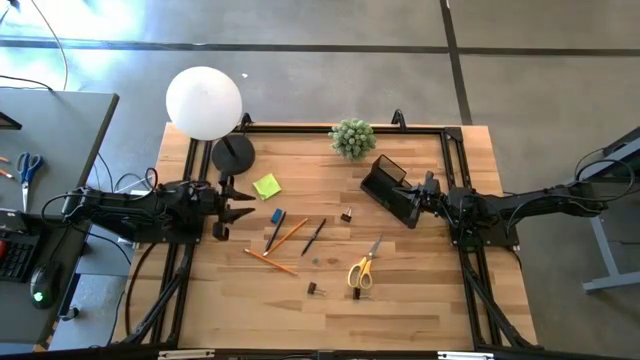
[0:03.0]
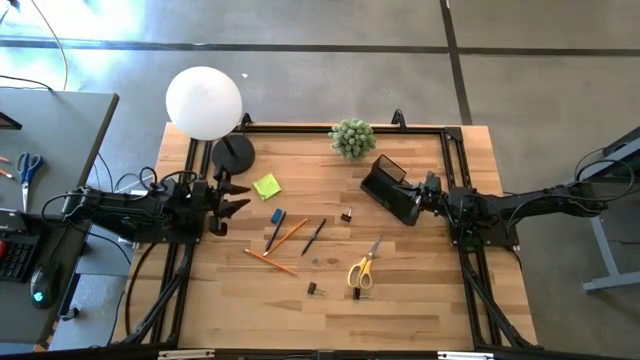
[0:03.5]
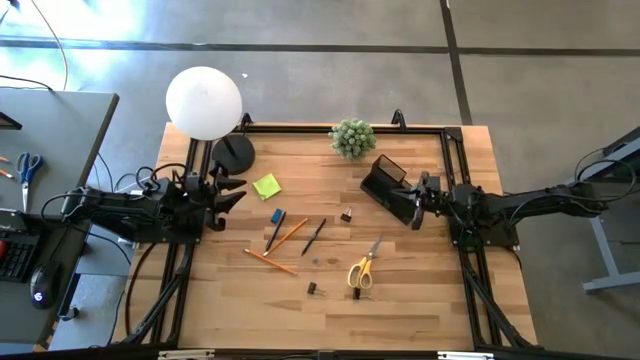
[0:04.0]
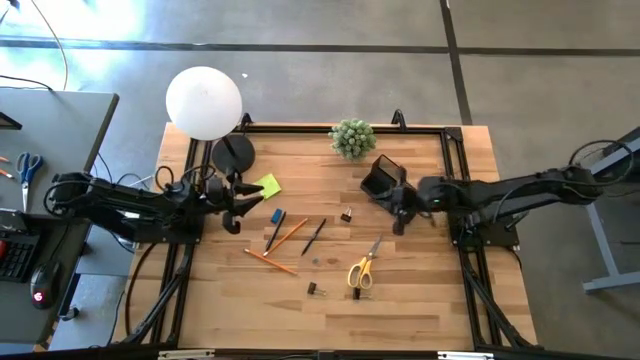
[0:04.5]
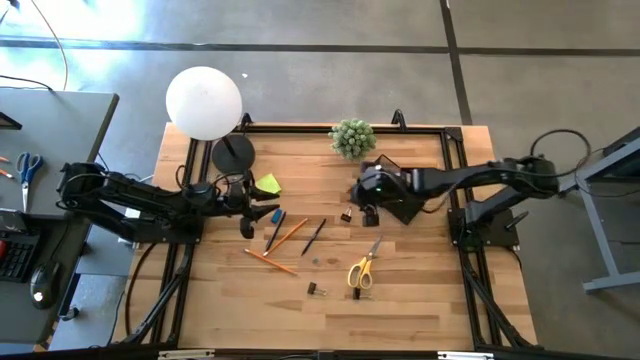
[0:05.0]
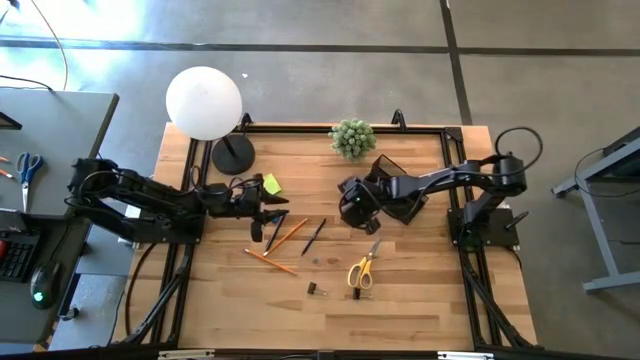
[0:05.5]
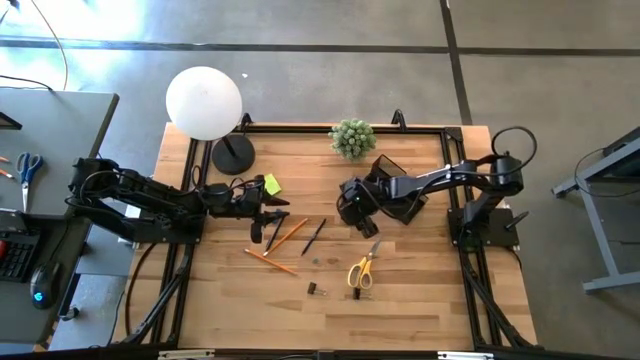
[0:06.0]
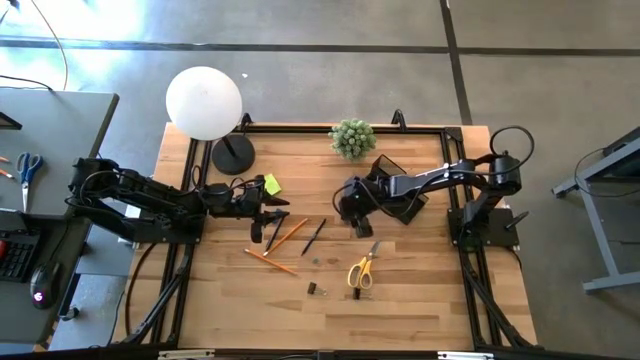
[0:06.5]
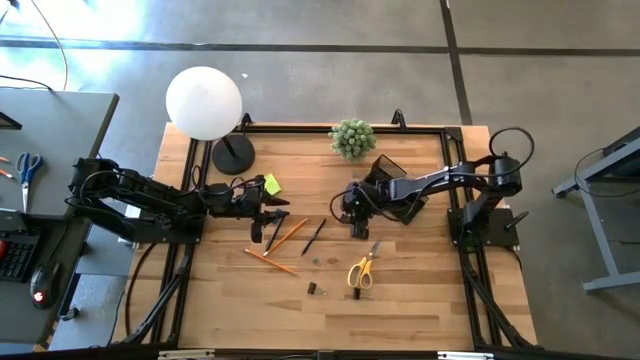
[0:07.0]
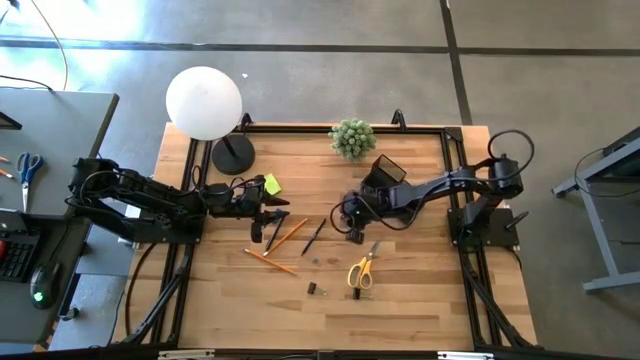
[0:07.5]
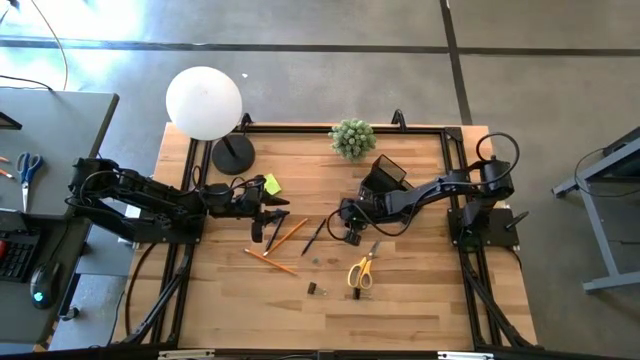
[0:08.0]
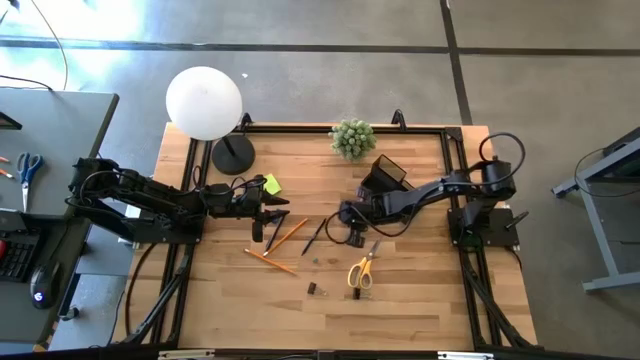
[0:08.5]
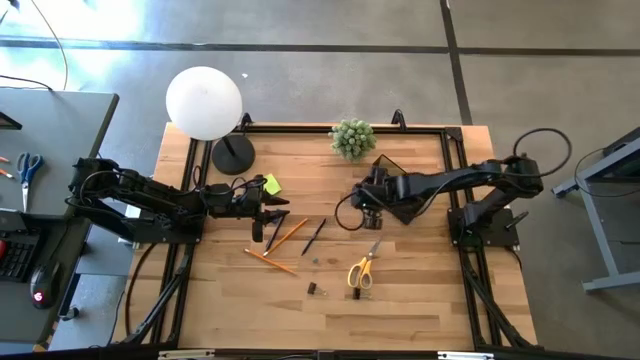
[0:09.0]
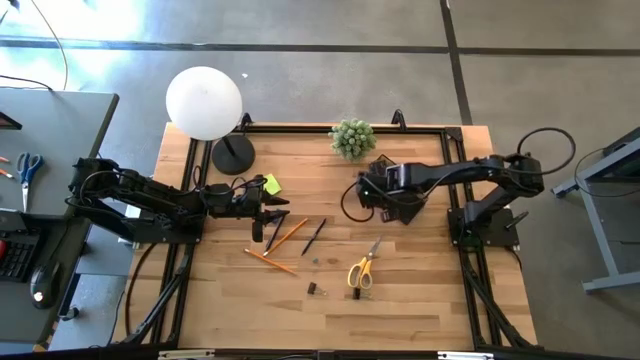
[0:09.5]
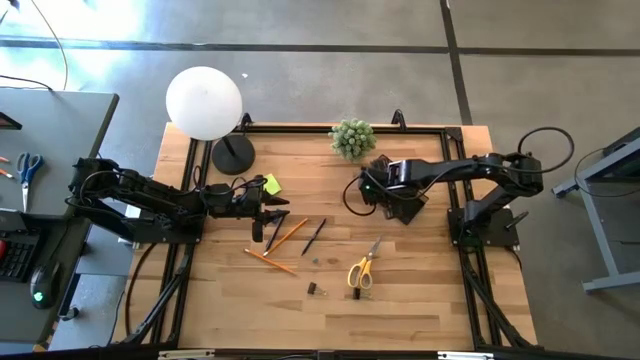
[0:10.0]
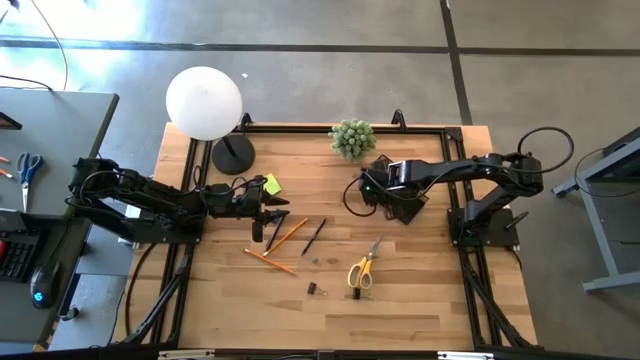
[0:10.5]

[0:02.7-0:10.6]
Task: Pick and place office supplies into organizer
Put the top black binder clip into the desk organizer

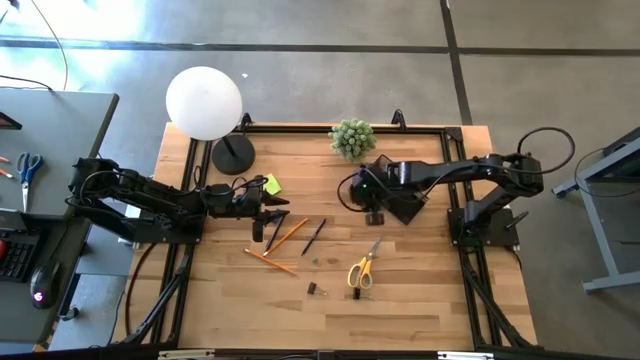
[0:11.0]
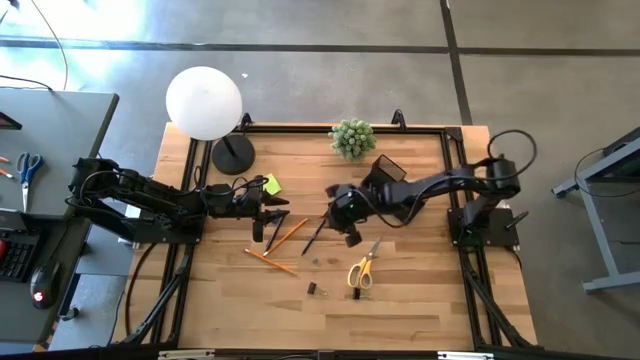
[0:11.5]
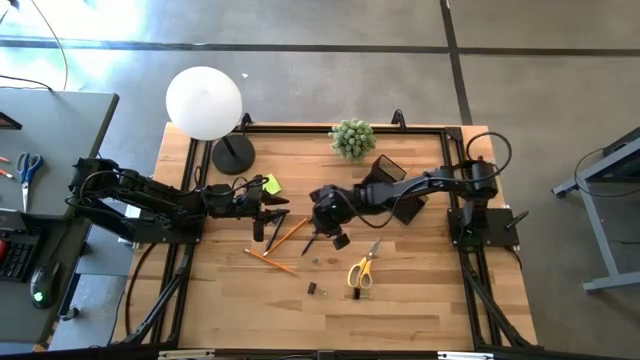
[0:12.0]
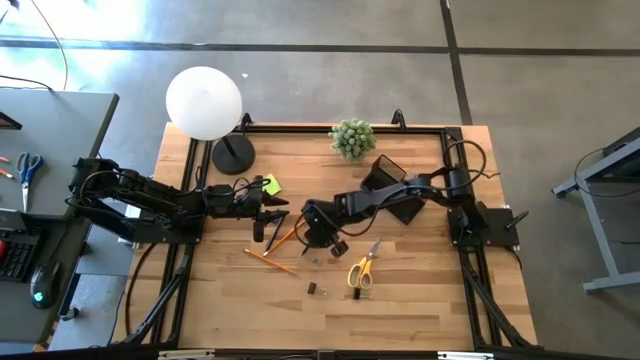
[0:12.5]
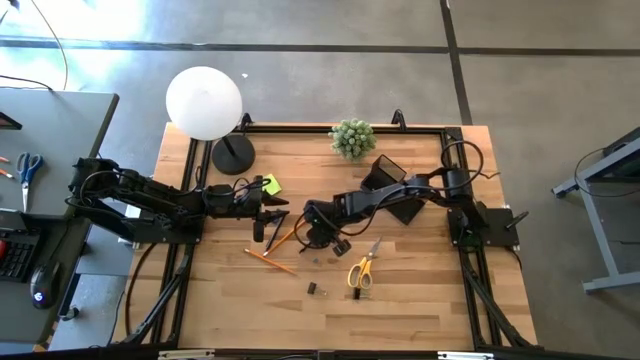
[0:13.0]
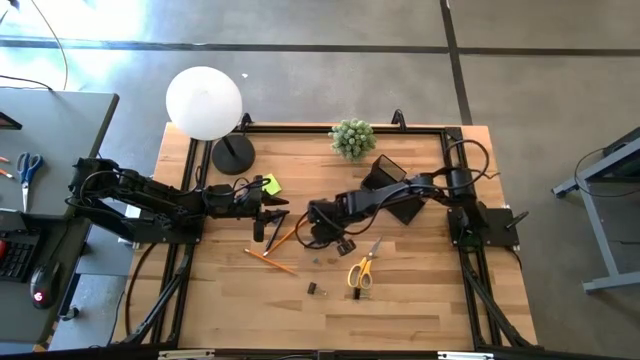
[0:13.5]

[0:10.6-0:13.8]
Put the right black pen into the desk organizer

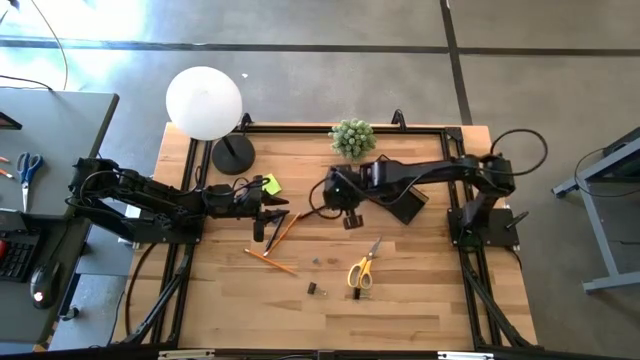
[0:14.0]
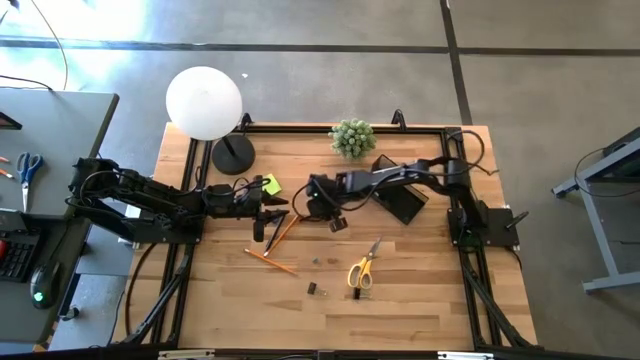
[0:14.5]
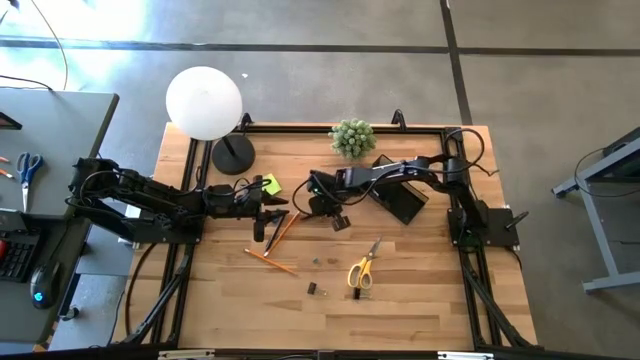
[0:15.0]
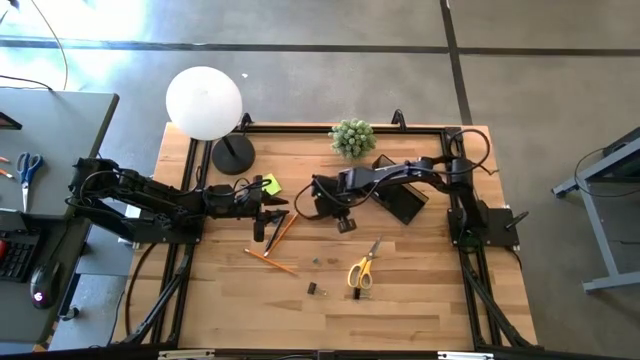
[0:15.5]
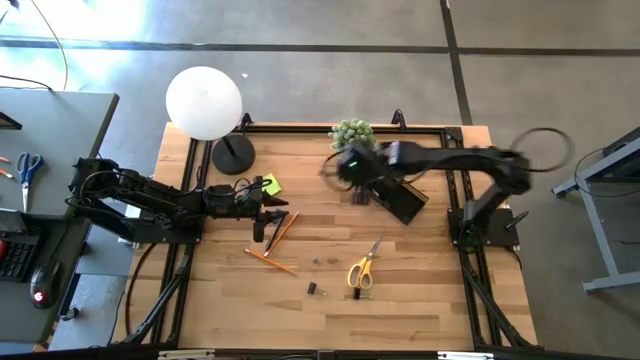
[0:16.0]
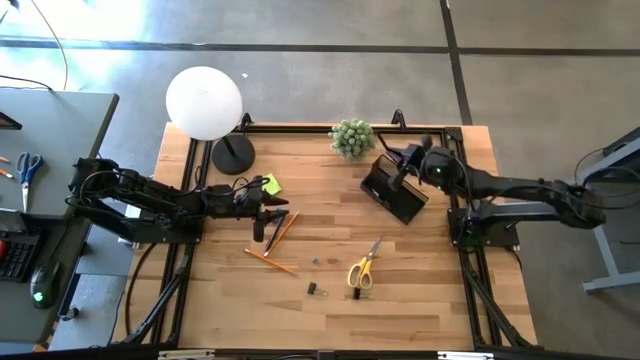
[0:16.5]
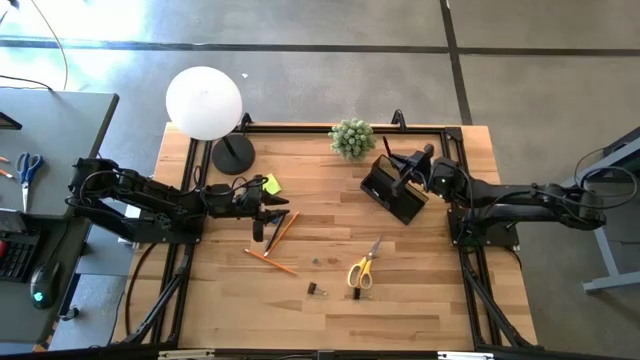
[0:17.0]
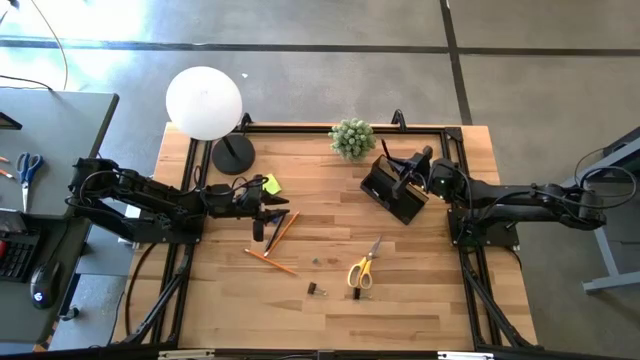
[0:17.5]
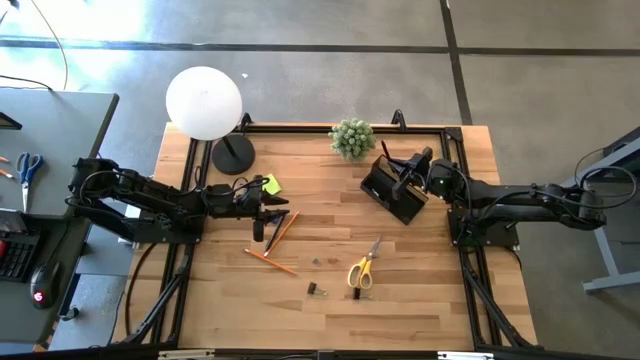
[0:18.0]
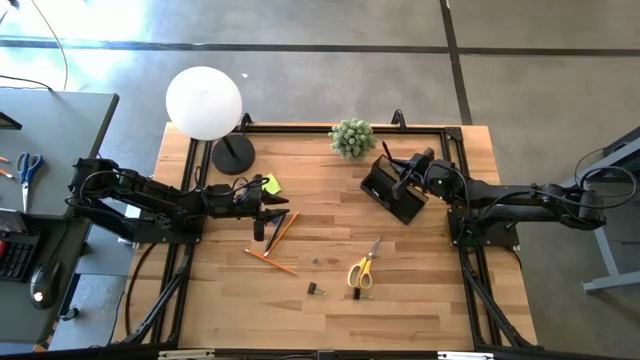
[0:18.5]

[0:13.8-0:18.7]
Put the right black pen into the desk organizer

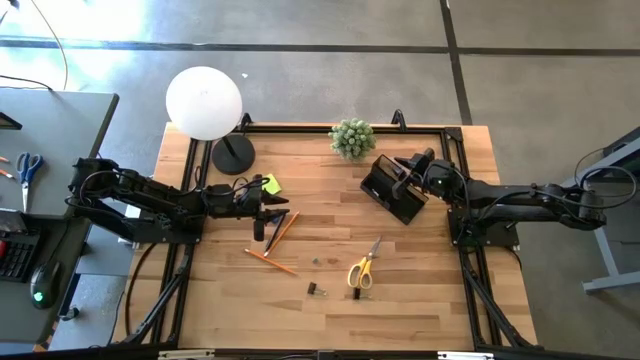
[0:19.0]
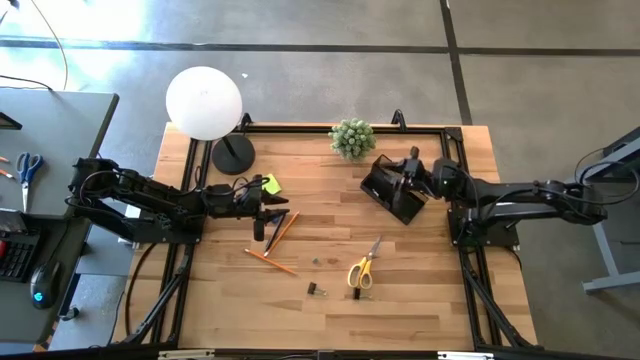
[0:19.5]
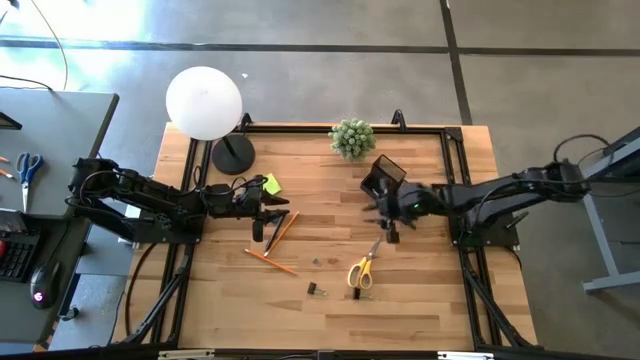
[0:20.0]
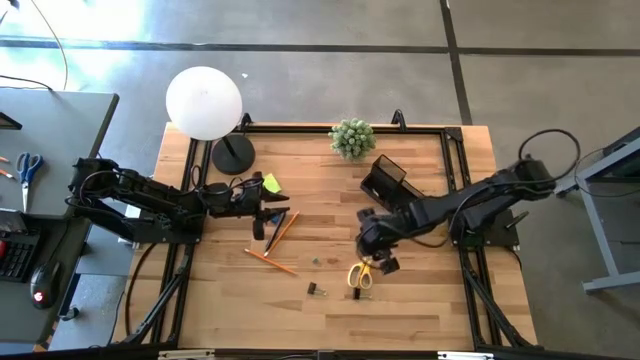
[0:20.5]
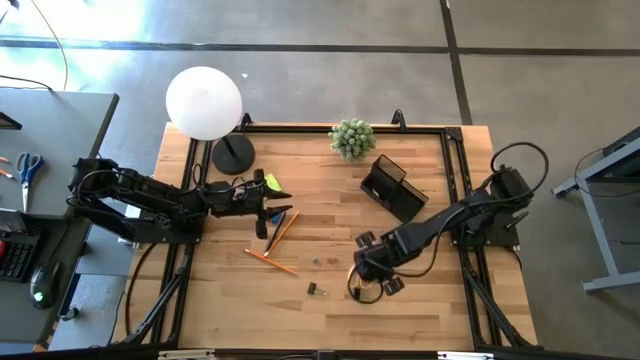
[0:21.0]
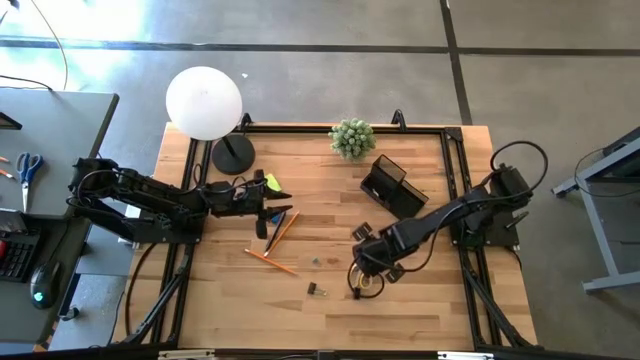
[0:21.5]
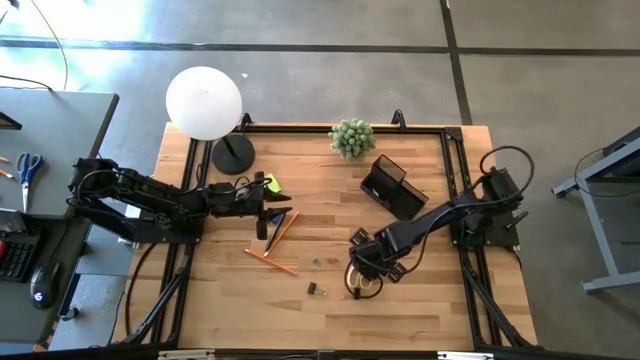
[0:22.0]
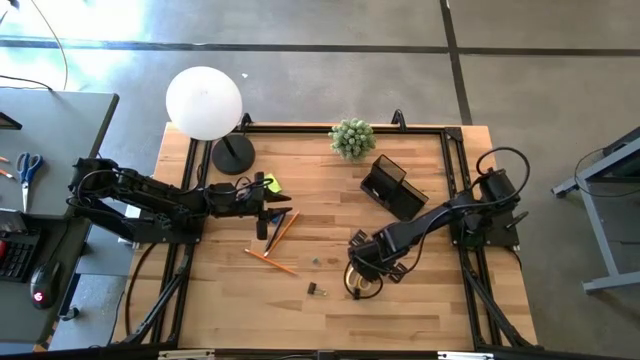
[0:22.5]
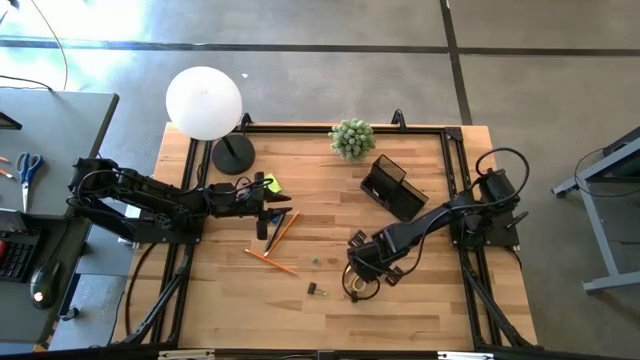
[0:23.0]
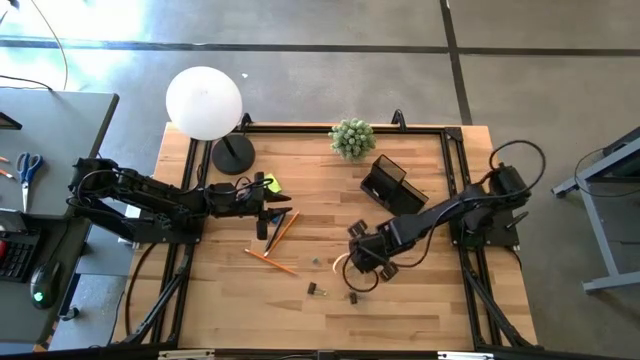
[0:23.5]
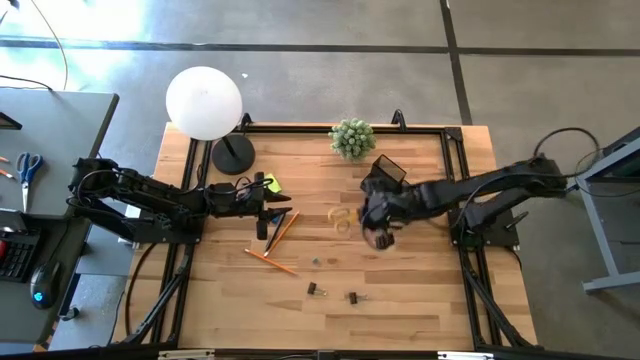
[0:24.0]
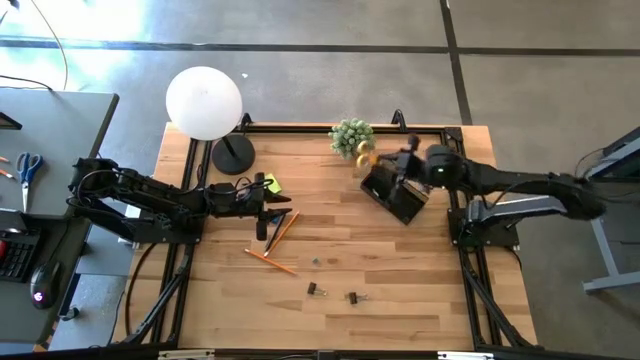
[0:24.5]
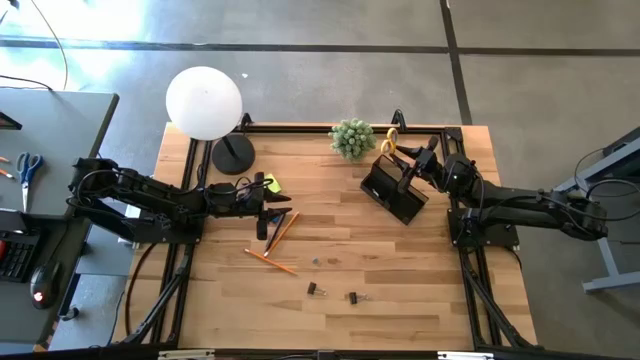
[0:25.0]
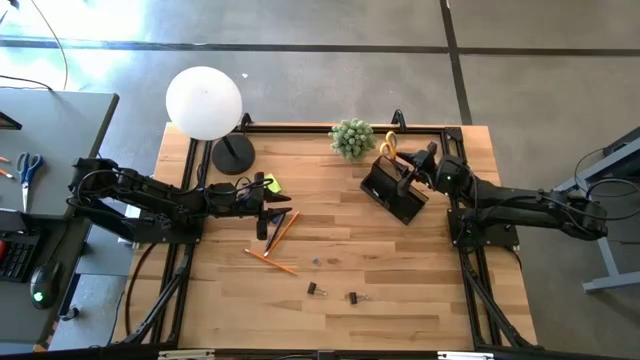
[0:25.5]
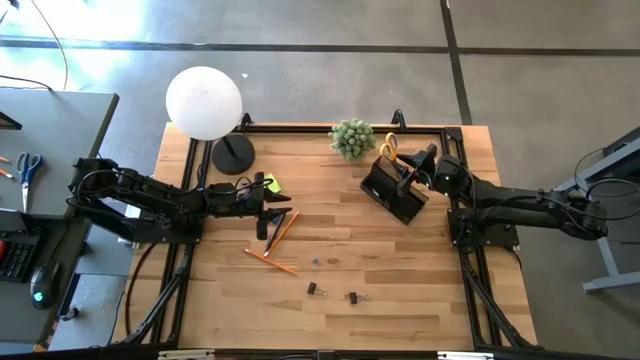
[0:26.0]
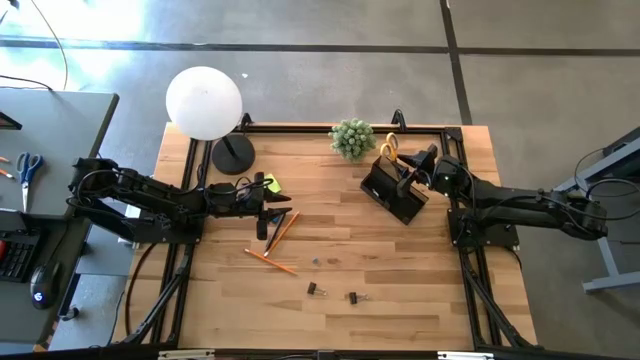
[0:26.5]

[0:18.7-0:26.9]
Put the yellow scissors into the desk organizer
